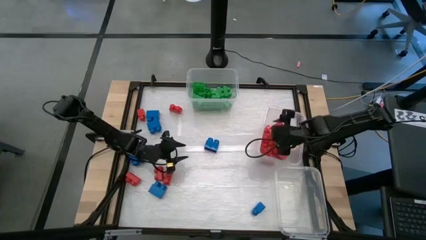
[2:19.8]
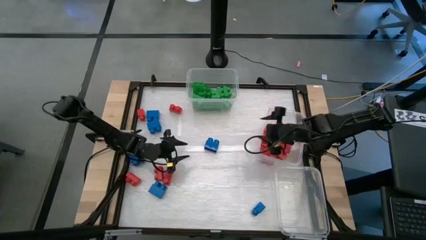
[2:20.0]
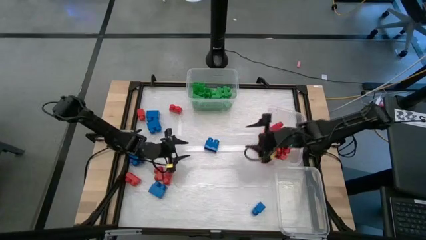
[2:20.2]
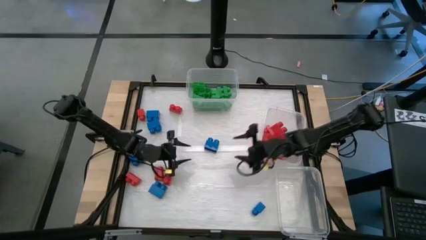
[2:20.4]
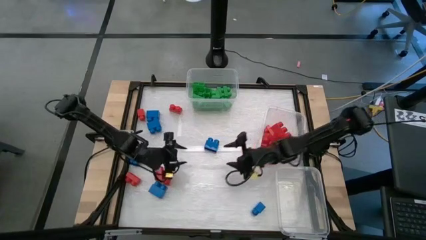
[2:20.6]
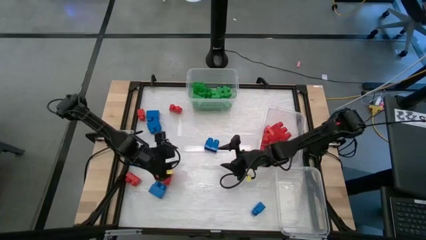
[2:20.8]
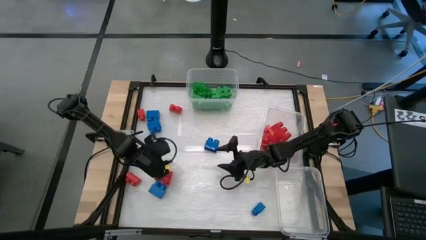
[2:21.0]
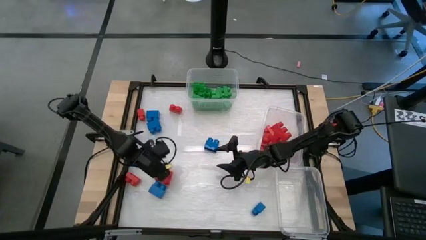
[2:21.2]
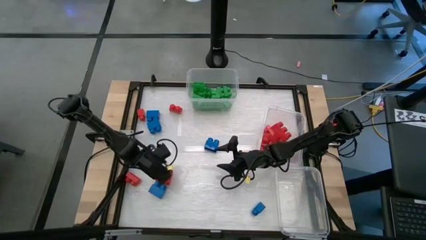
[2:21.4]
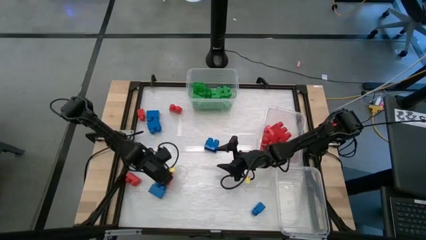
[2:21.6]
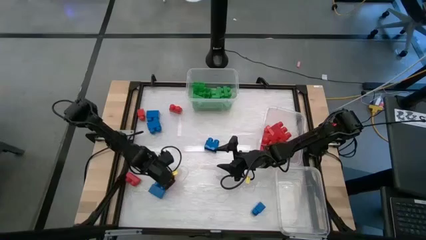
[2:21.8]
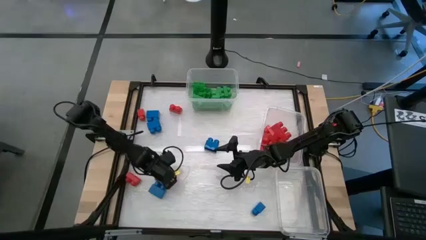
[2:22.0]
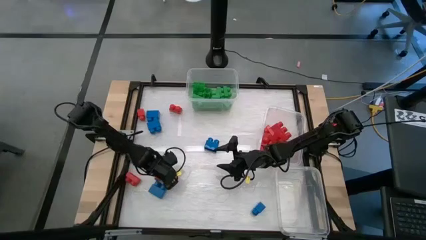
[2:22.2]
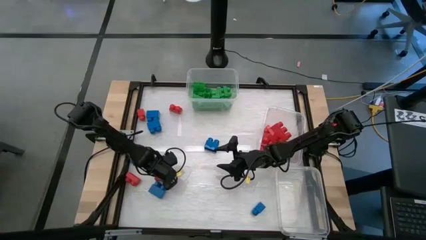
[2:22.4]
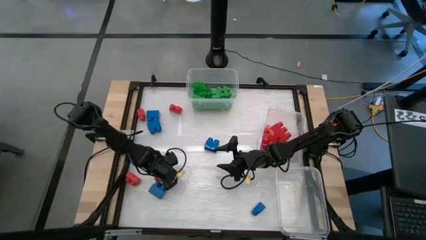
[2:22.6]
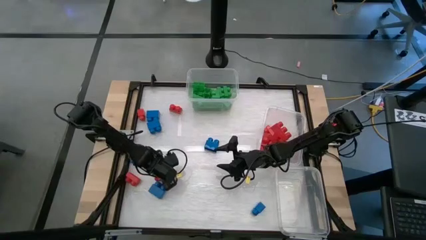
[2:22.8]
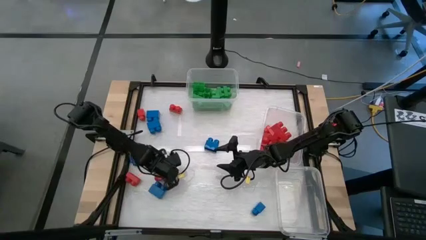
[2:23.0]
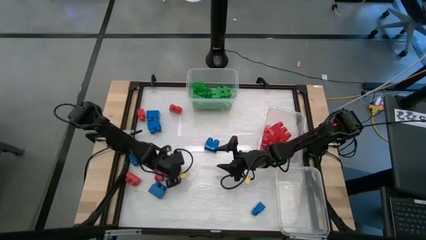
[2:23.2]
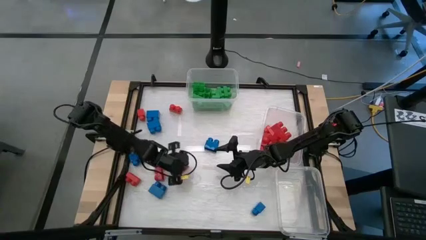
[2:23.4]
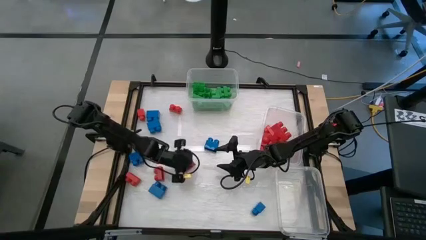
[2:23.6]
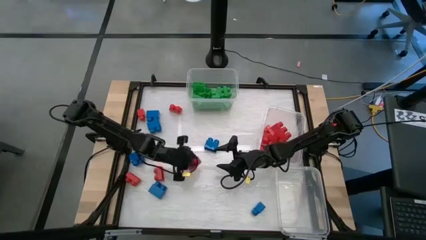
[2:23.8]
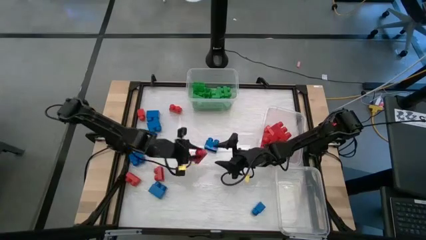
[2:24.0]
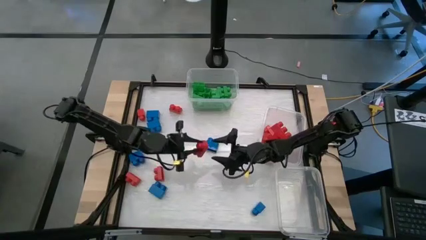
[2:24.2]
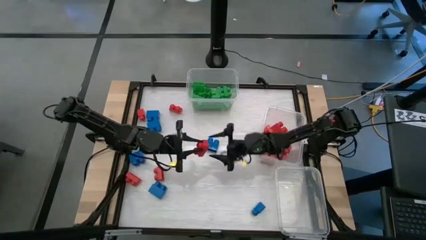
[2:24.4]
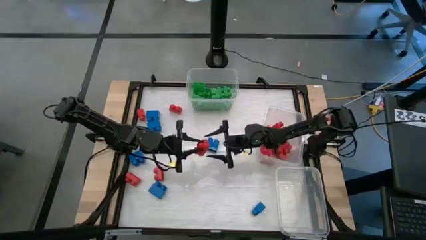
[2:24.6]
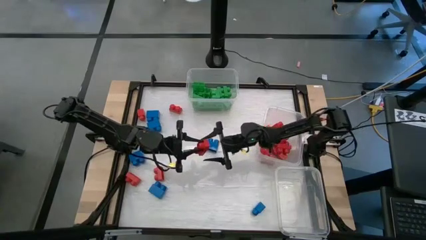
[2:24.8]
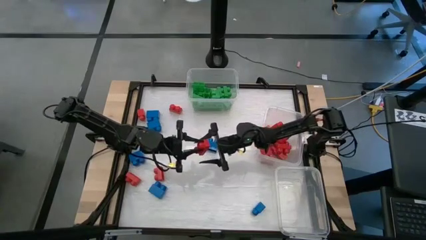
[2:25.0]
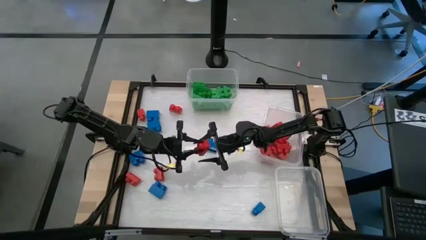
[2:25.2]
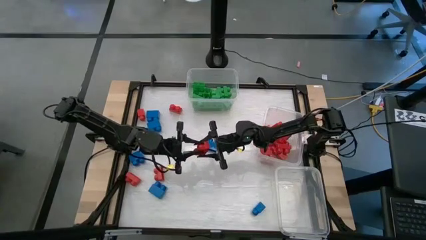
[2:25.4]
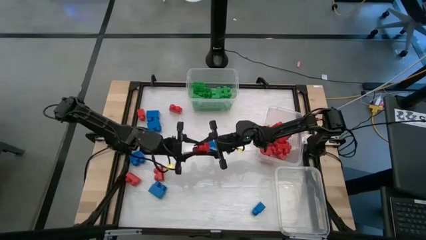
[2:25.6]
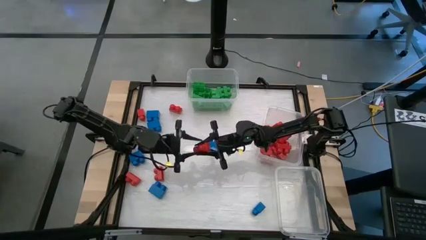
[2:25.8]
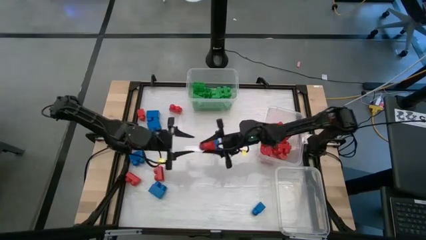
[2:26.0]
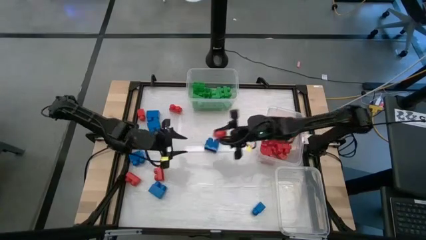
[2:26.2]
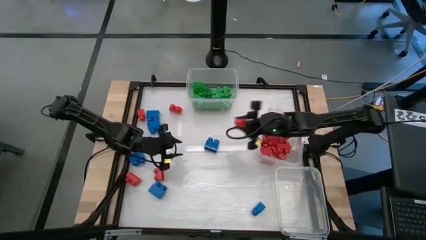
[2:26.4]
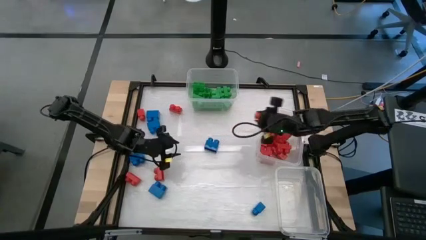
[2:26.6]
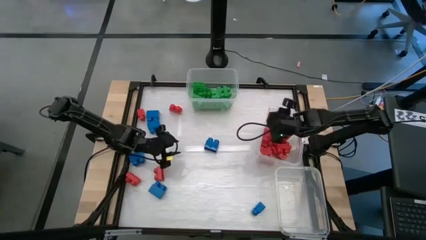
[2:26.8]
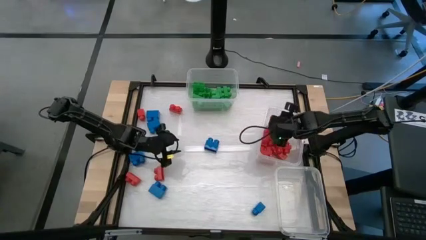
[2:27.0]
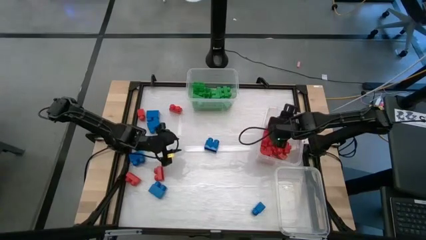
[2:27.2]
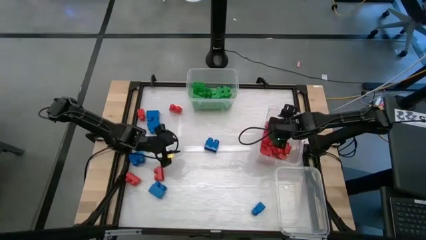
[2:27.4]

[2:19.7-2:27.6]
Task: Sort blocks
Put the red game piece into the middle right transparent bin

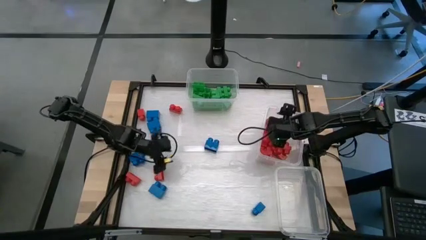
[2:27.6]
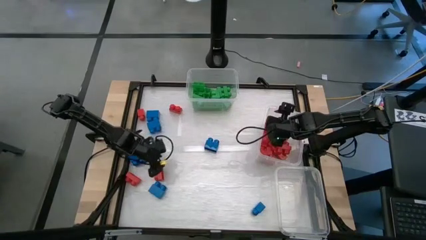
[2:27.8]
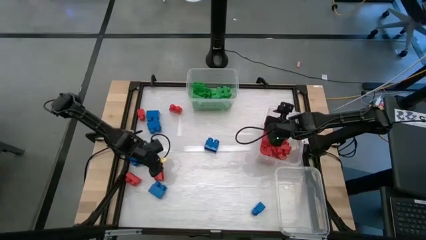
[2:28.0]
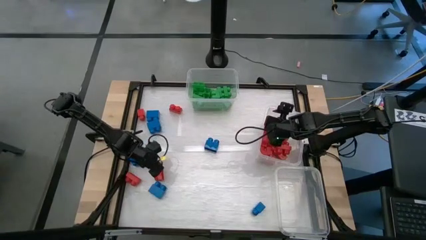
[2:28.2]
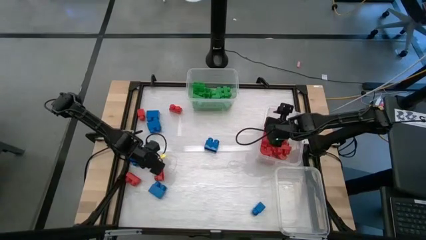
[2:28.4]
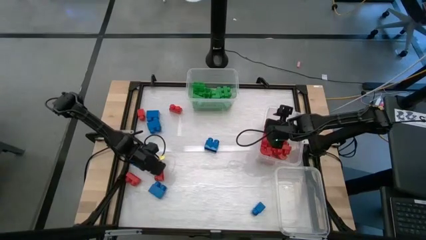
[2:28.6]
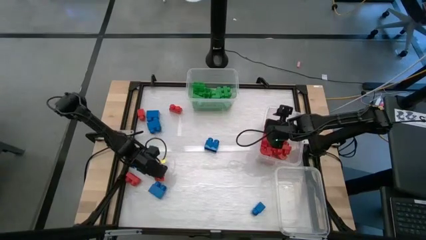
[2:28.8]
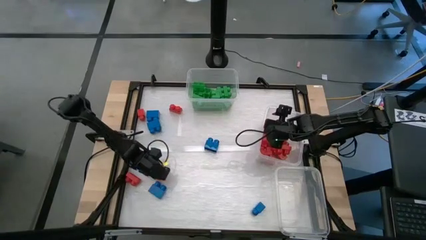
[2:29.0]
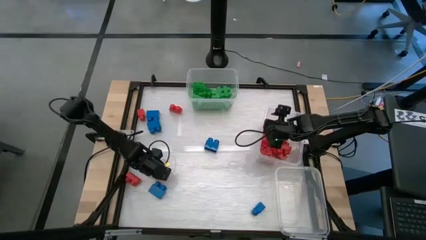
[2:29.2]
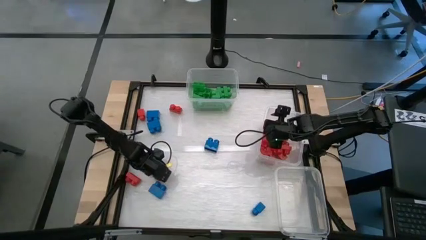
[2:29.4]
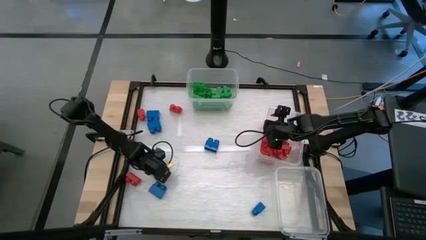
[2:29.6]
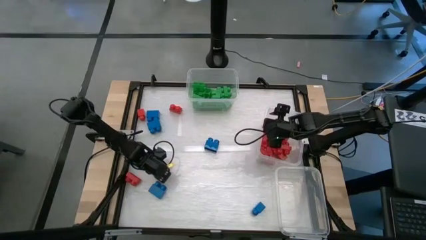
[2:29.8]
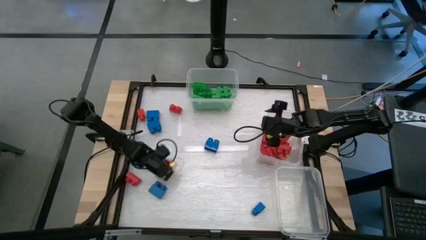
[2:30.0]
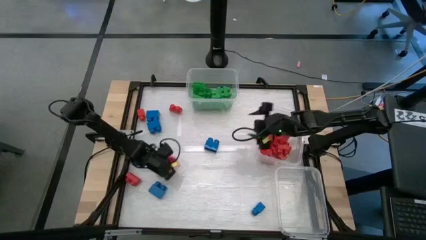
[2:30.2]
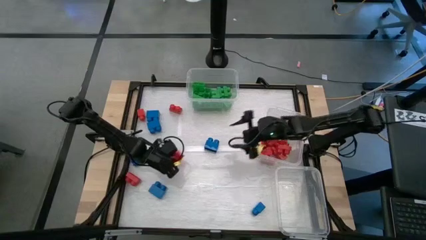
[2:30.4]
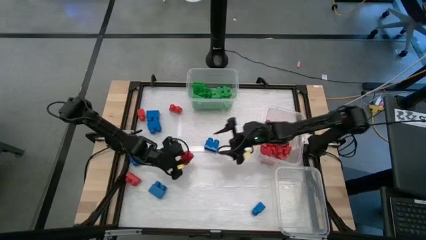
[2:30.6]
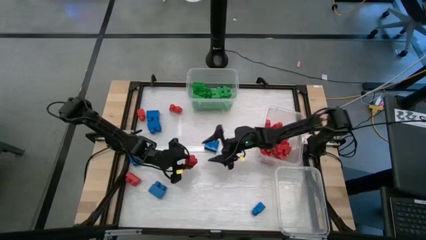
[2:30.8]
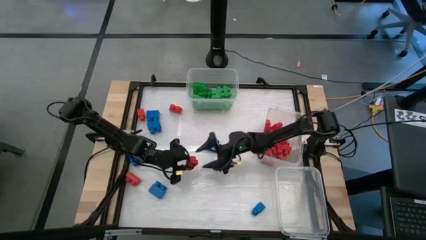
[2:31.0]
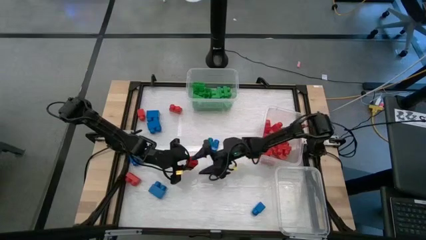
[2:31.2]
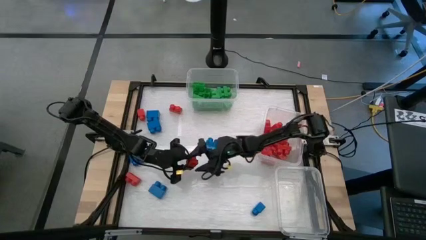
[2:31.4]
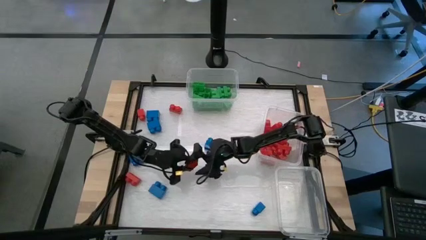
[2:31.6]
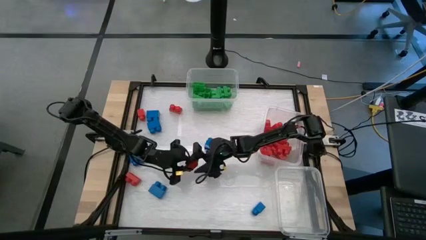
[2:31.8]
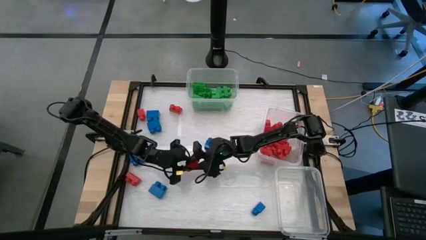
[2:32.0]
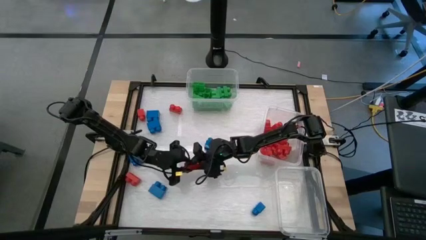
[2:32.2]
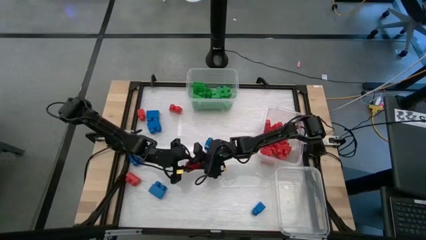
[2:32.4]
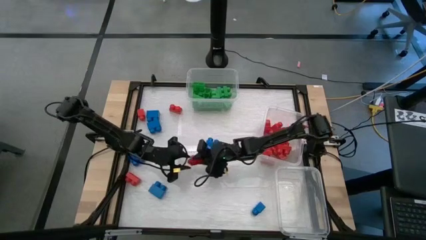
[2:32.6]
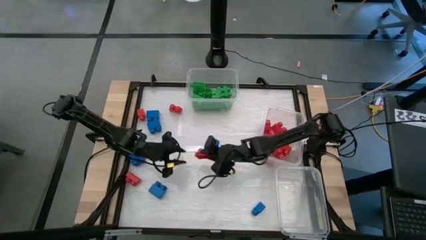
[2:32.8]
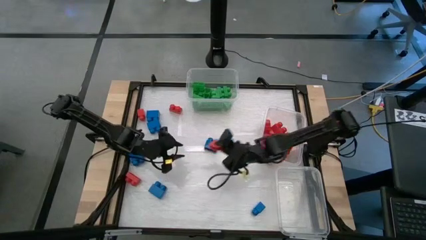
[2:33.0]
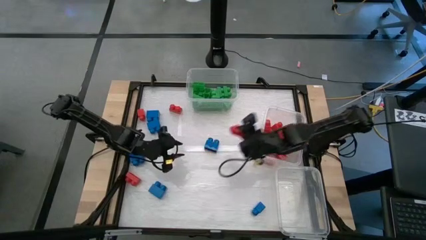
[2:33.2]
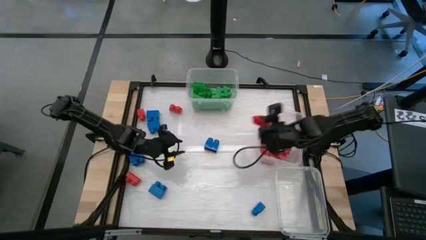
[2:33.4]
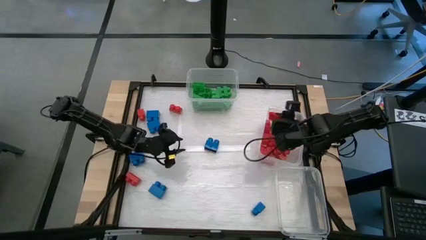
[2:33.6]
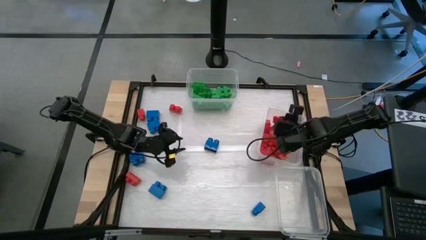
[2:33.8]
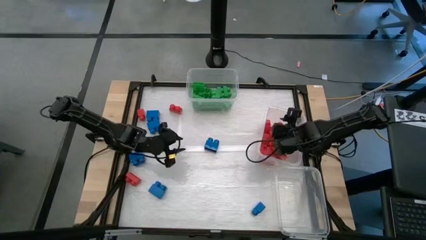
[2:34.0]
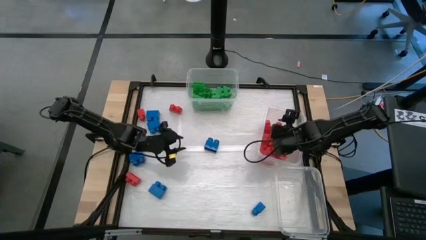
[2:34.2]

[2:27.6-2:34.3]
Put the red game piece into the middle right transparent bin
